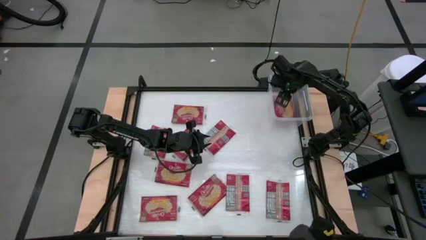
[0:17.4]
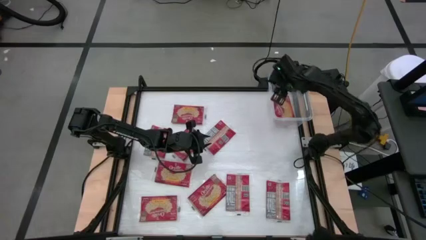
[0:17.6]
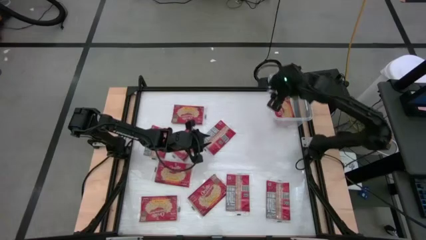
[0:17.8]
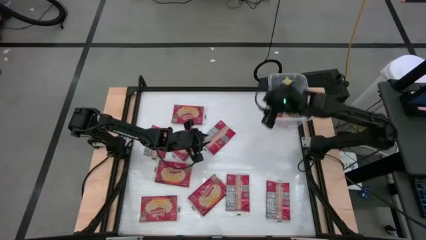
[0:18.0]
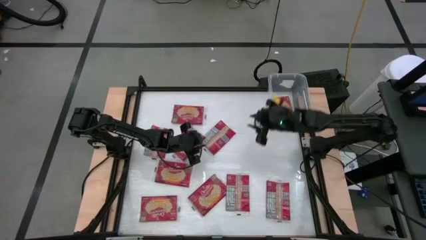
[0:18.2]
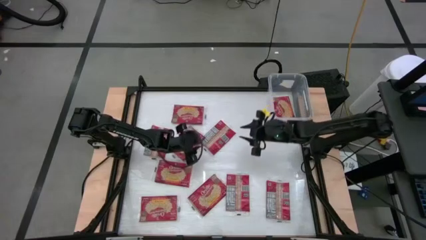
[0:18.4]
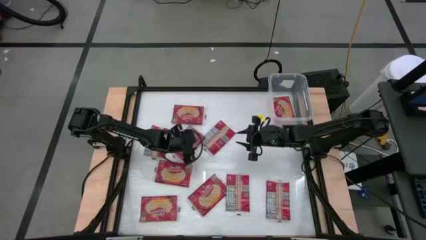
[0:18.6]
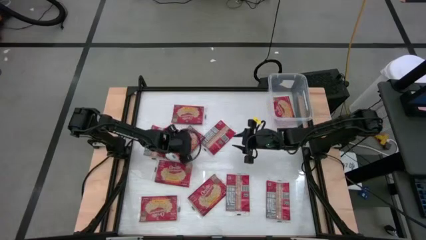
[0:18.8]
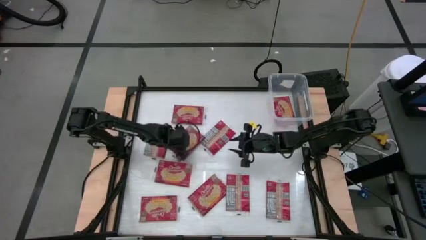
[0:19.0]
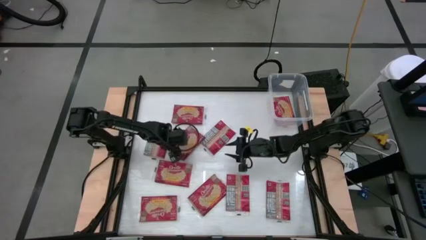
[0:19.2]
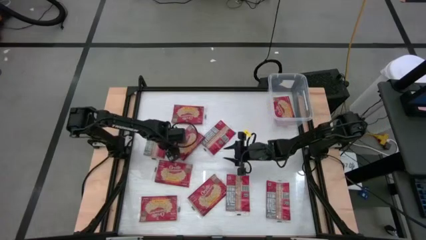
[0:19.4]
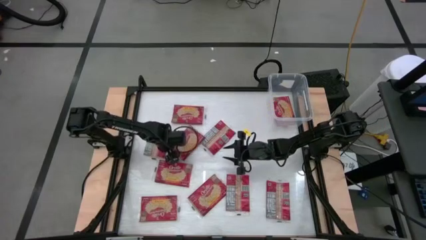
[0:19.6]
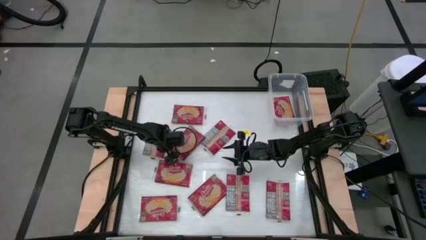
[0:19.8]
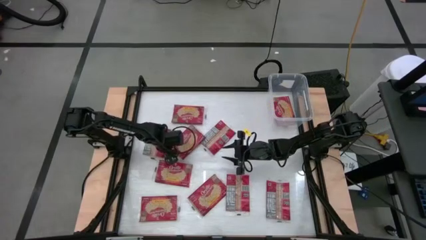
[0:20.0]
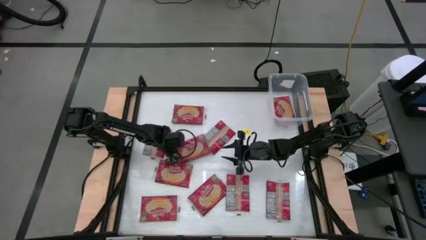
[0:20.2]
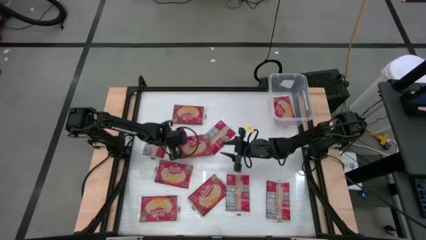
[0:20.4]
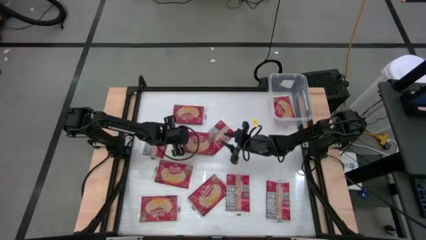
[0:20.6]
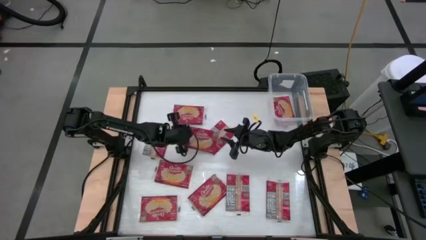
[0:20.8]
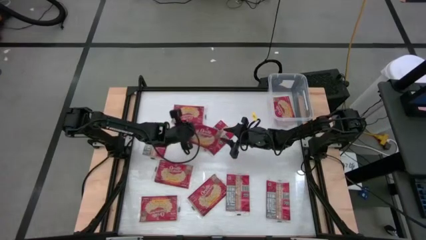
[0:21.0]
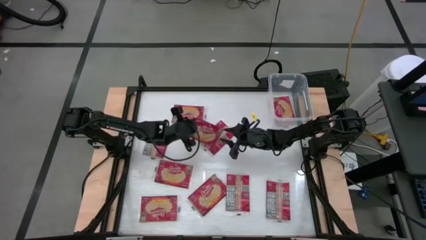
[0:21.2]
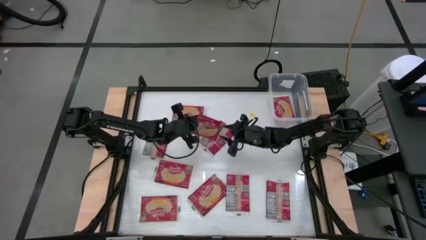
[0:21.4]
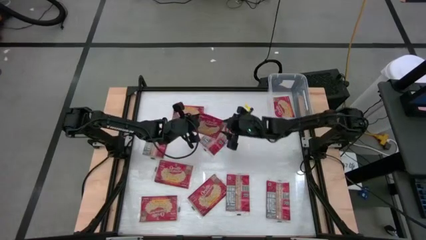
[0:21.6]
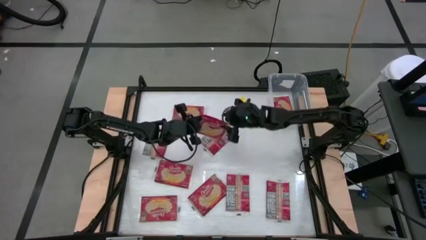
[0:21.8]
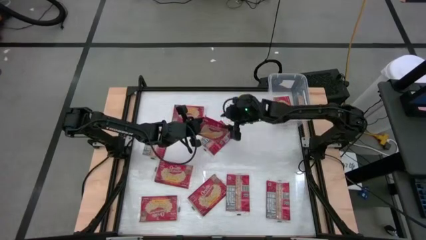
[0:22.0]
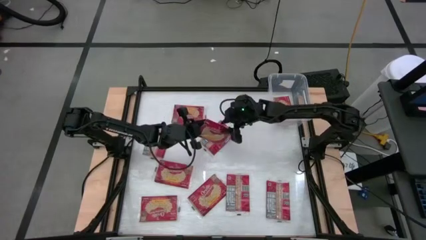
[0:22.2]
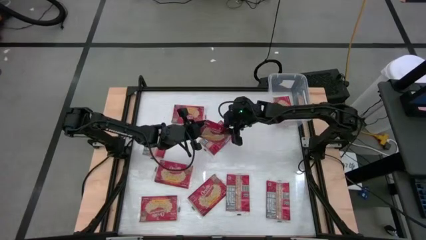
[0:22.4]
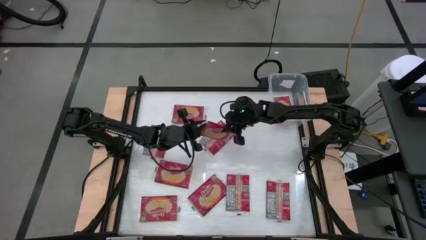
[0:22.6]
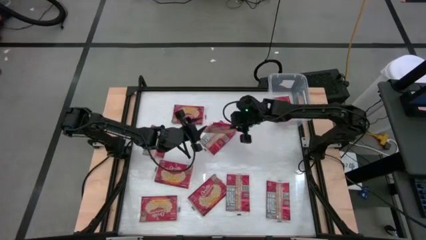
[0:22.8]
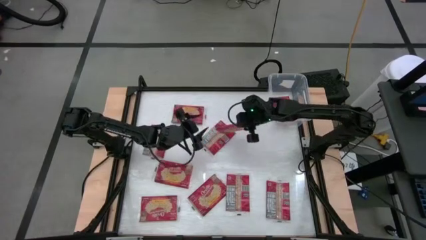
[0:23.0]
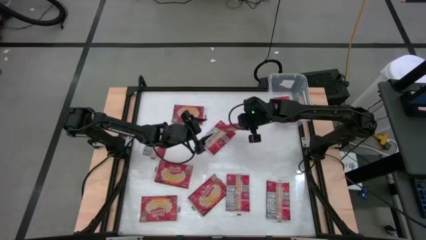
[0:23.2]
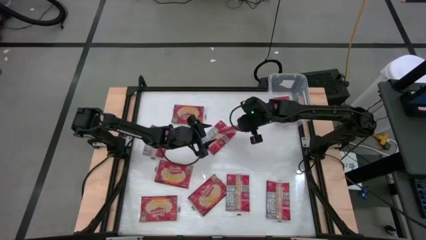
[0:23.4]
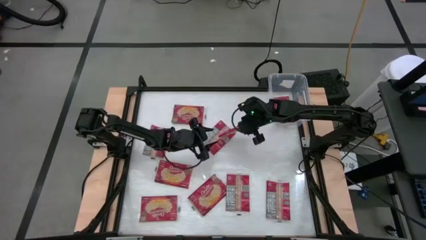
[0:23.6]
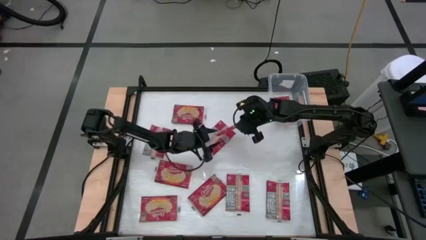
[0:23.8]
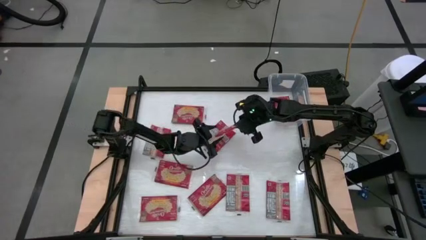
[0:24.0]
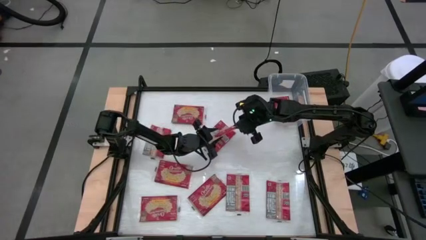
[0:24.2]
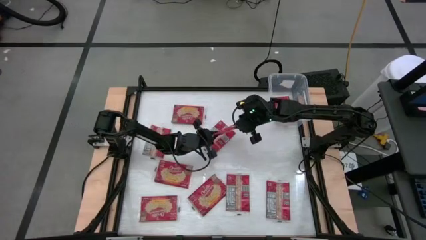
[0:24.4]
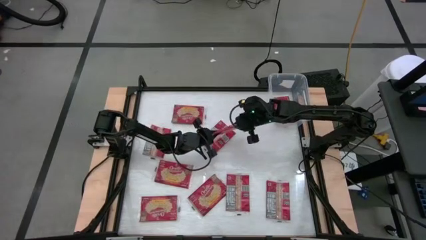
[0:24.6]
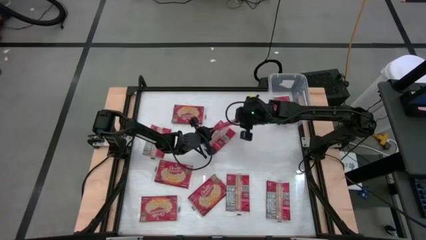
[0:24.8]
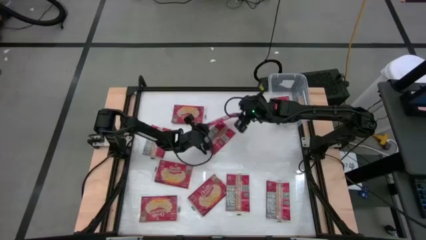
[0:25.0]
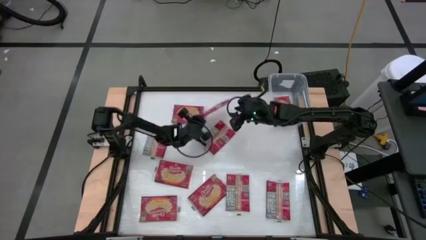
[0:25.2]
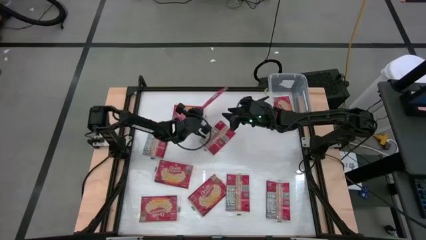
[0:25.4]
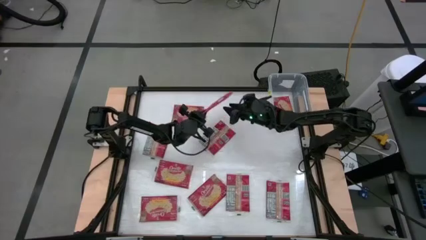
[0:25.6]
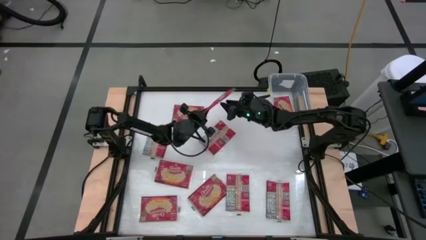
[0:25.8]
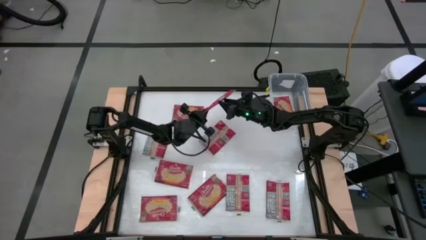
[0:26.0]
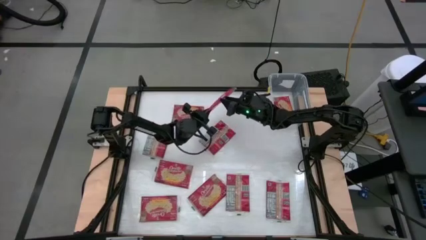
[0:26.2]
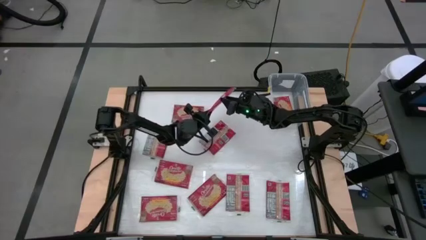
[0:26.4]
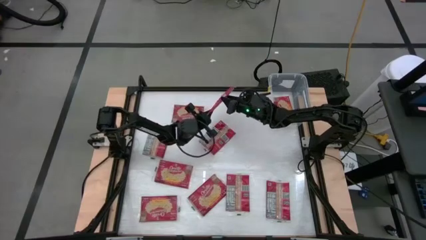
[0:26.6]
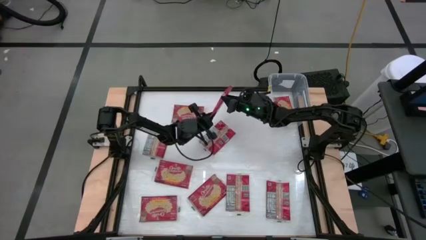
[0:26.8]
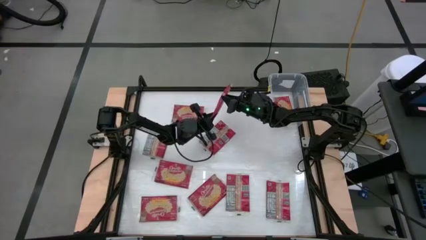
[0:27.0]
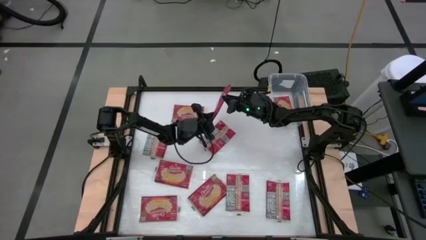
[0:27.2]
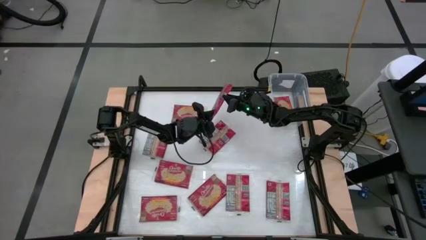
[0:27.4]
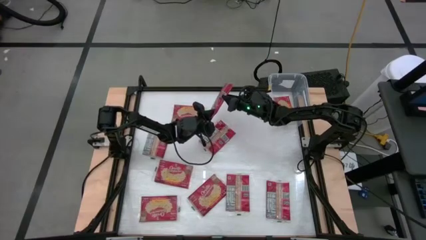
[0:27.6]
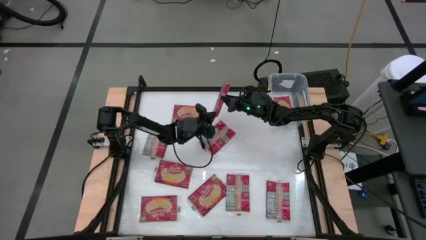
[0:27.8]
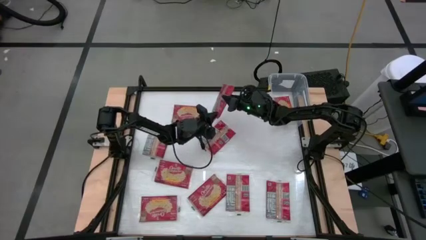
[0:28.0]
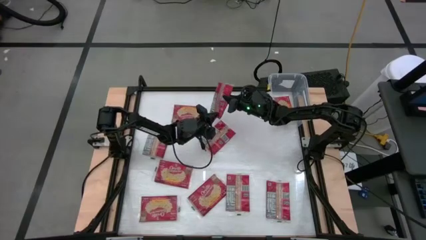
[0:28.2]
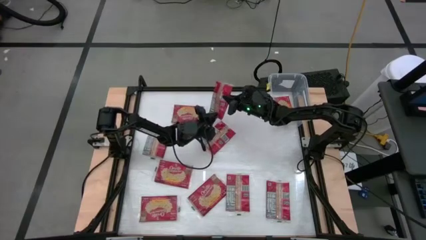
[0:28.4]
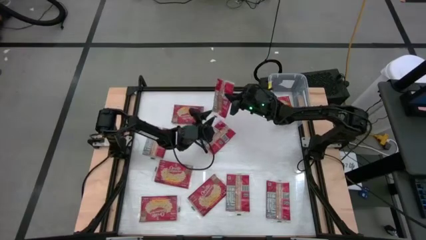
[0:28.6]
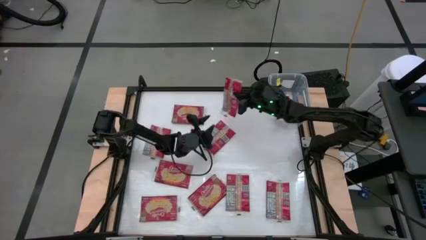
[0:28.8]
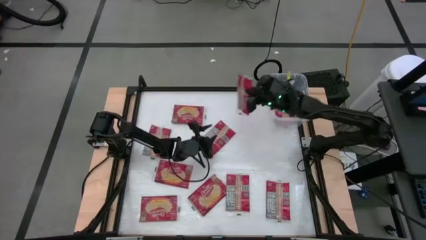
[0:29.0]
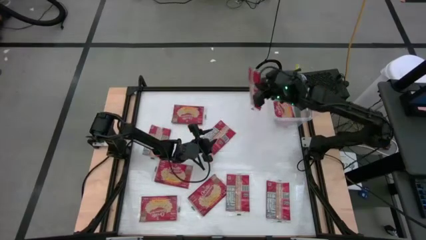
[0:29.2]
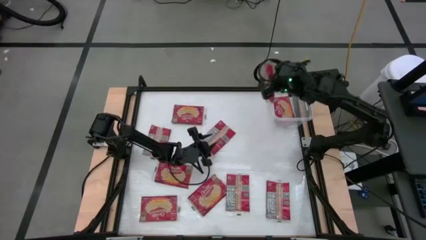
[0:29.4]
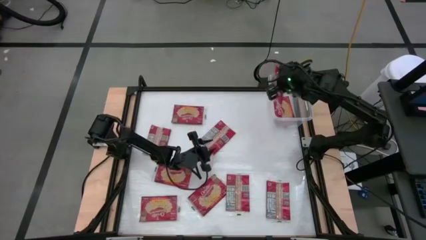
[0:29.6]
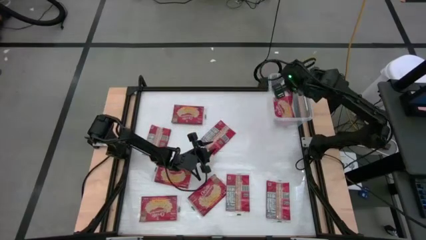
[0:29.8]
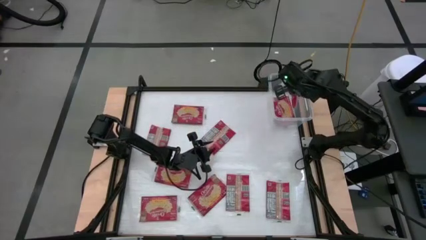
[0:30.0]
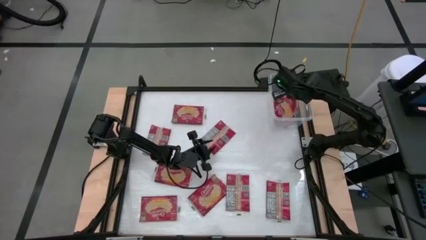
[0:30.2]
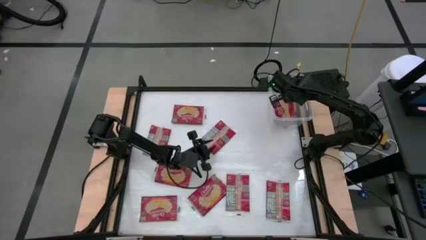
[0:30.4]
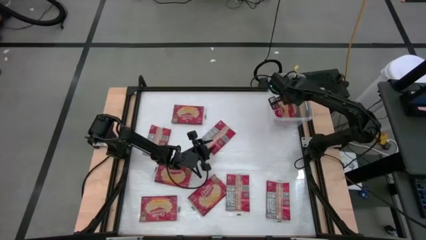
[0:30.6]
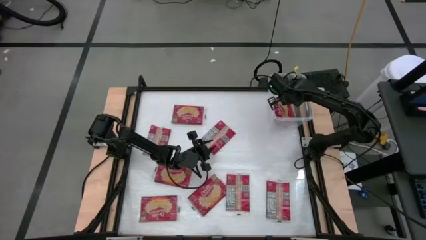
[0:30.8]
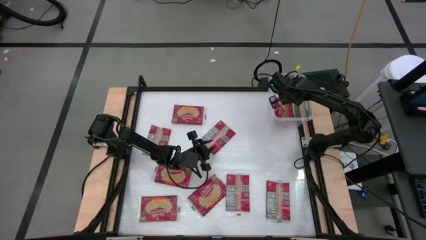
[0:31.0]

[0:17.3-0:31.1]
Task: Sort popcorn bags into baskets
Put the red popcorn bag into the transparent container
